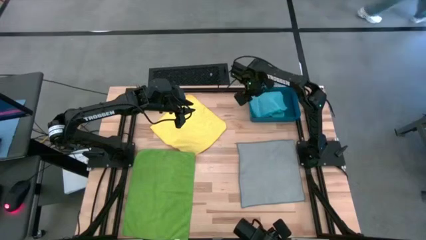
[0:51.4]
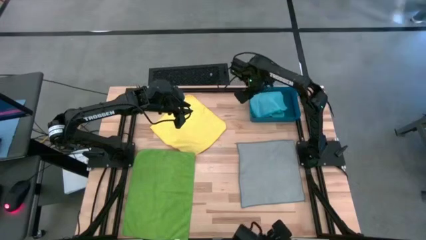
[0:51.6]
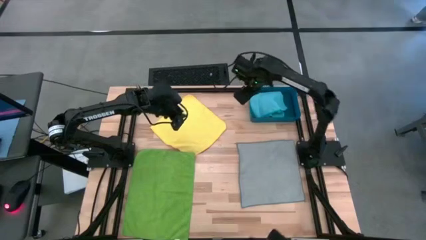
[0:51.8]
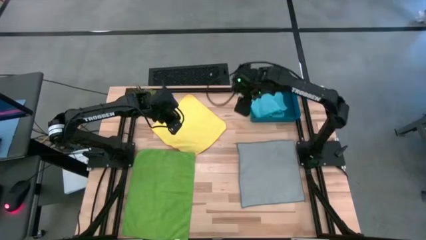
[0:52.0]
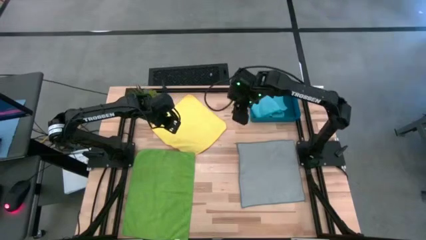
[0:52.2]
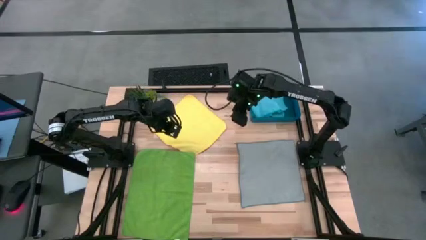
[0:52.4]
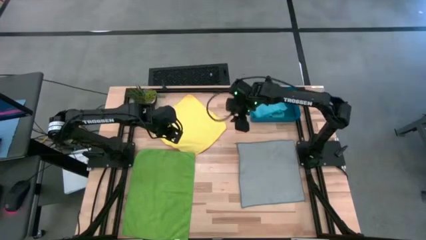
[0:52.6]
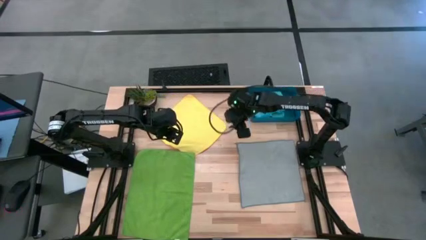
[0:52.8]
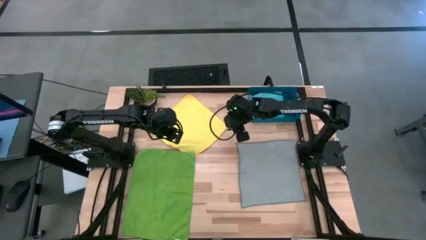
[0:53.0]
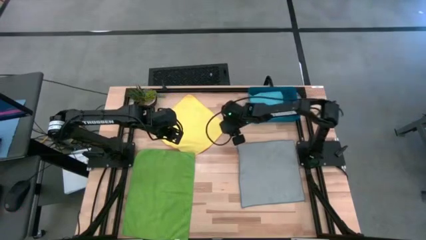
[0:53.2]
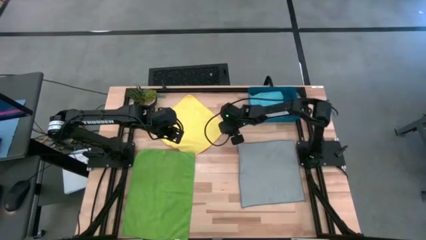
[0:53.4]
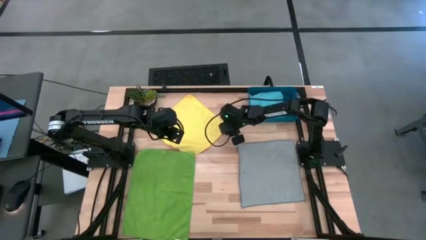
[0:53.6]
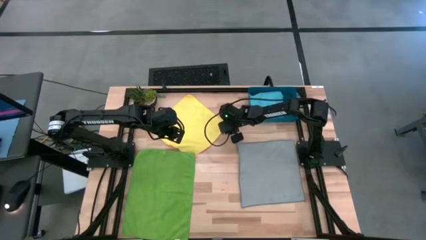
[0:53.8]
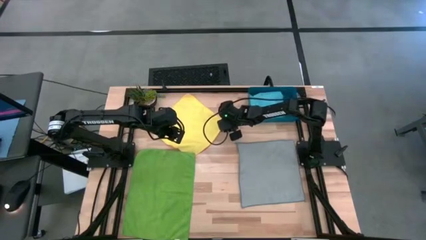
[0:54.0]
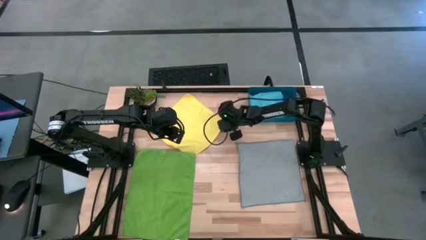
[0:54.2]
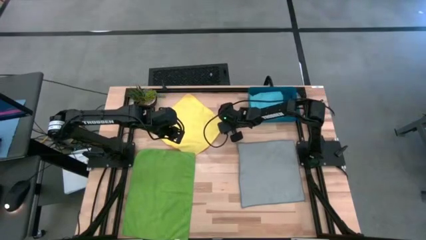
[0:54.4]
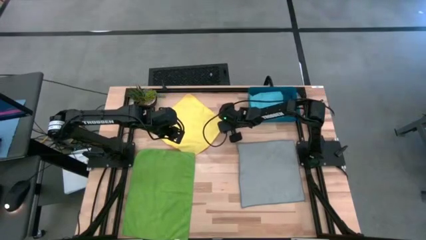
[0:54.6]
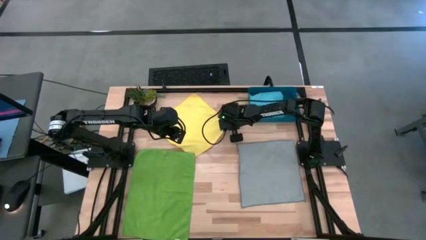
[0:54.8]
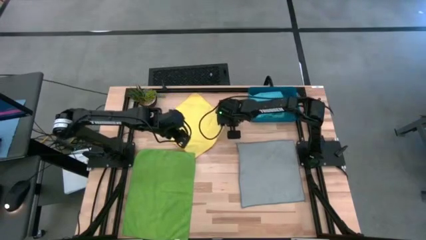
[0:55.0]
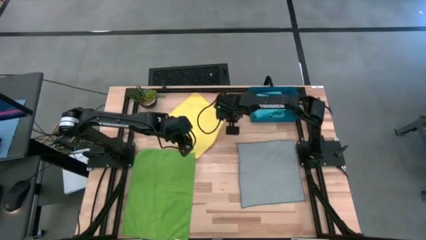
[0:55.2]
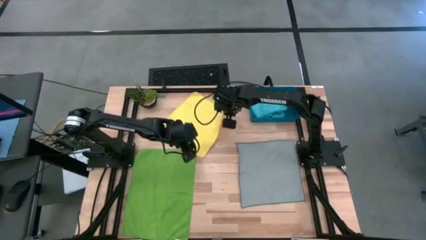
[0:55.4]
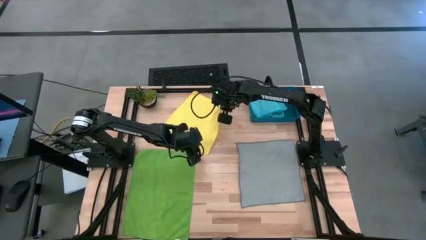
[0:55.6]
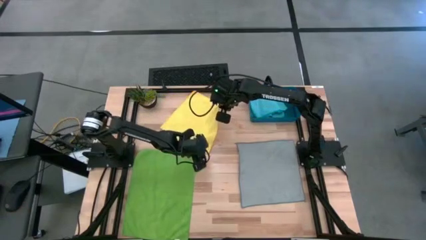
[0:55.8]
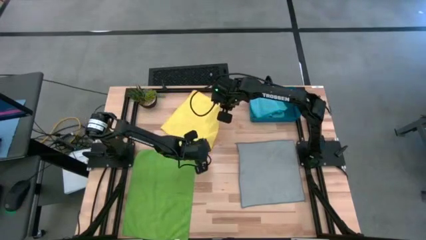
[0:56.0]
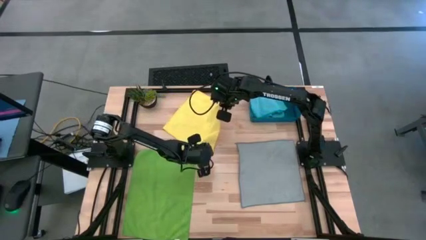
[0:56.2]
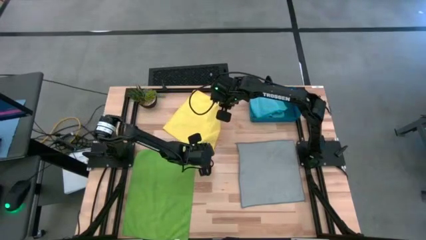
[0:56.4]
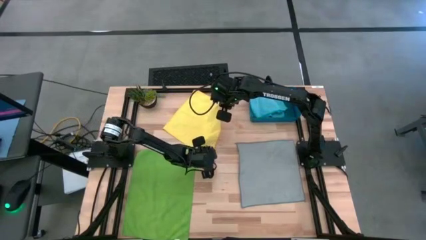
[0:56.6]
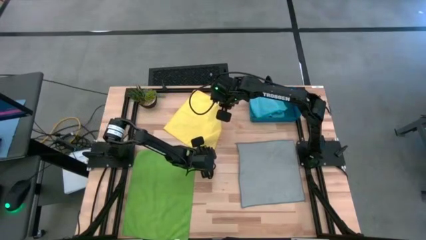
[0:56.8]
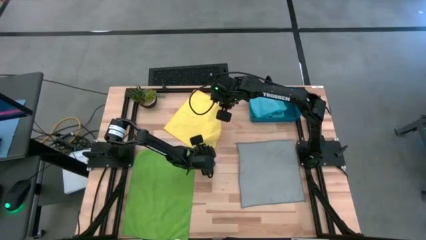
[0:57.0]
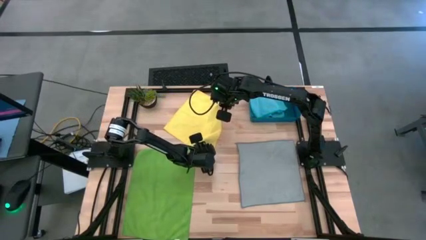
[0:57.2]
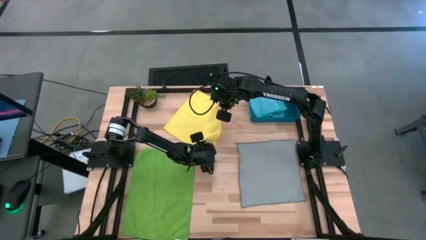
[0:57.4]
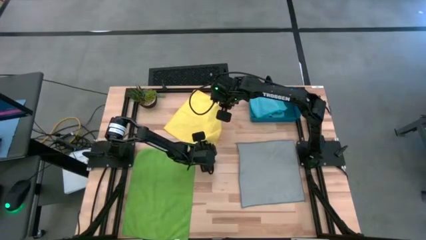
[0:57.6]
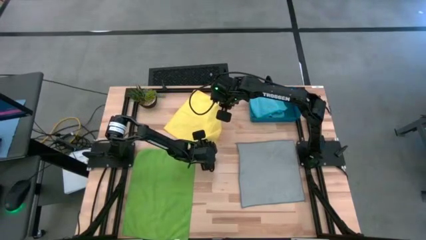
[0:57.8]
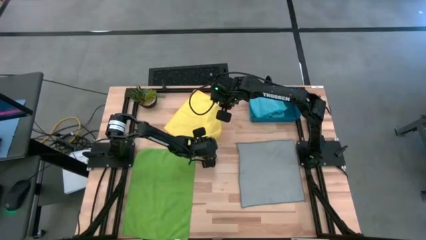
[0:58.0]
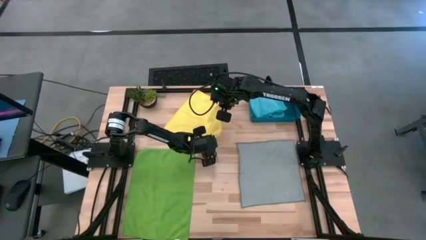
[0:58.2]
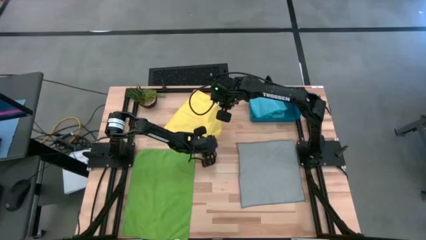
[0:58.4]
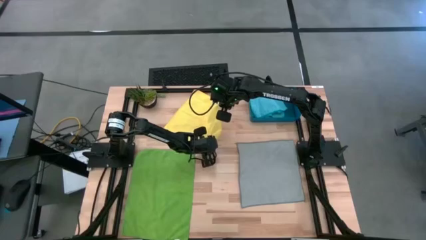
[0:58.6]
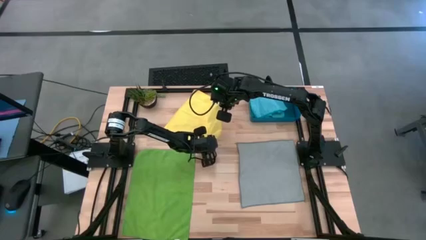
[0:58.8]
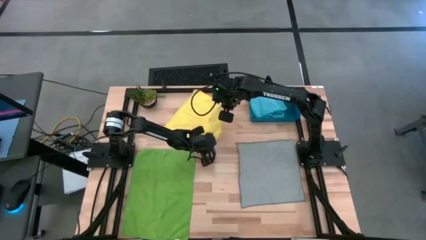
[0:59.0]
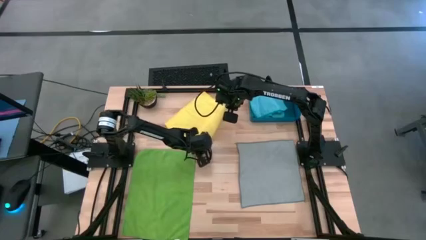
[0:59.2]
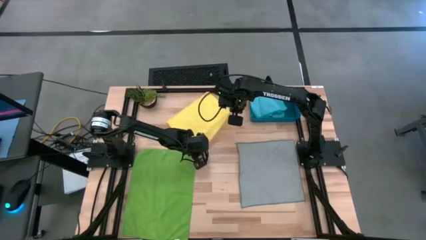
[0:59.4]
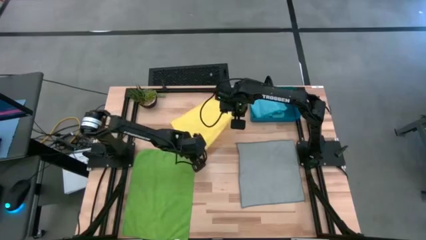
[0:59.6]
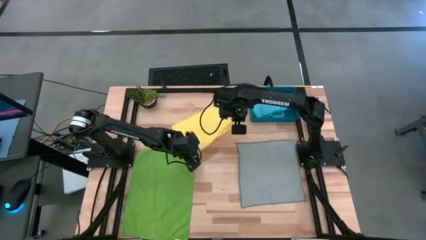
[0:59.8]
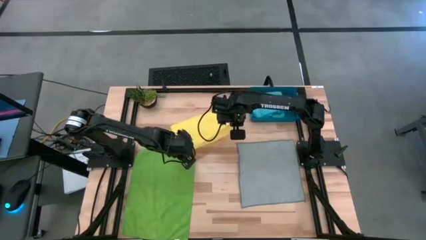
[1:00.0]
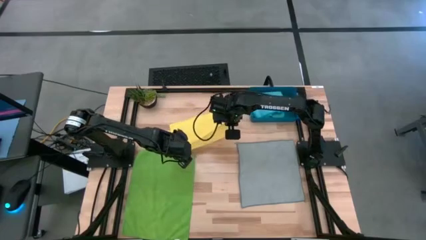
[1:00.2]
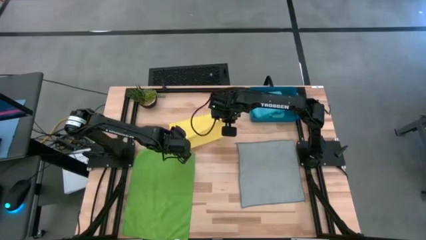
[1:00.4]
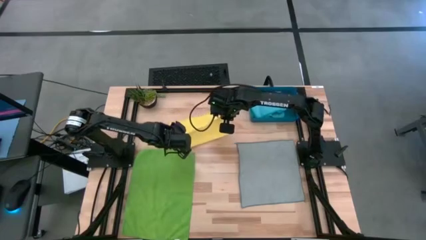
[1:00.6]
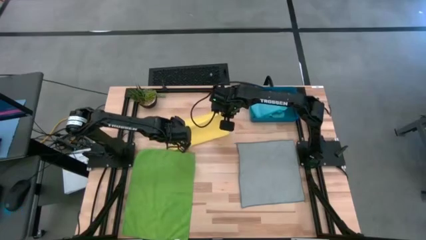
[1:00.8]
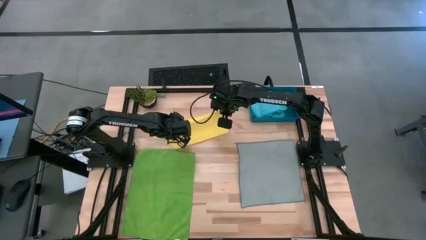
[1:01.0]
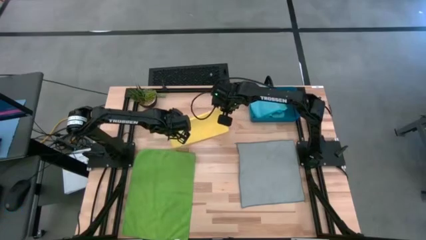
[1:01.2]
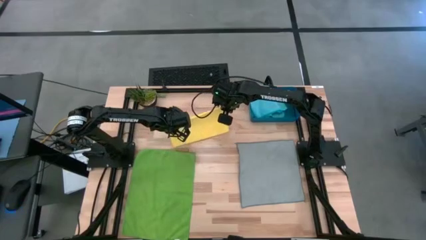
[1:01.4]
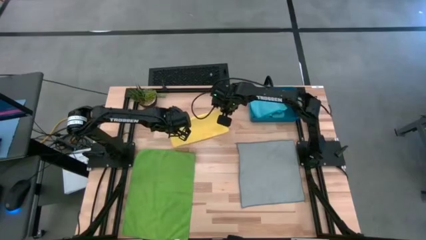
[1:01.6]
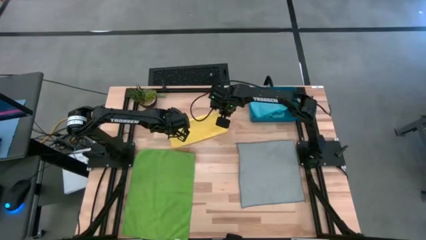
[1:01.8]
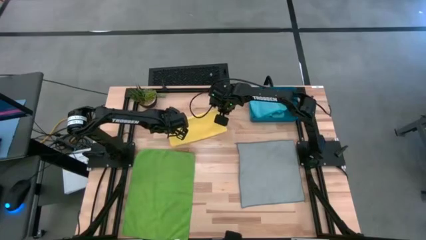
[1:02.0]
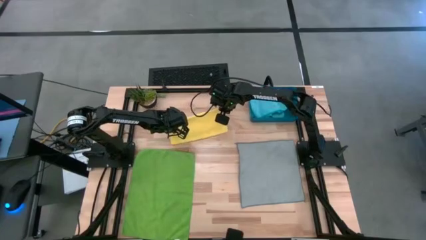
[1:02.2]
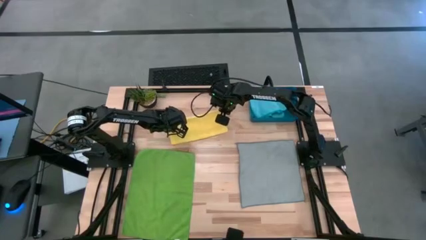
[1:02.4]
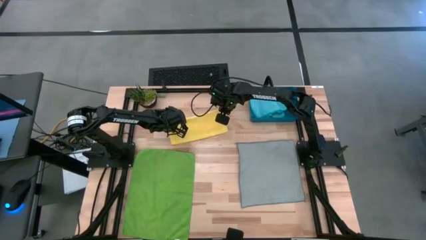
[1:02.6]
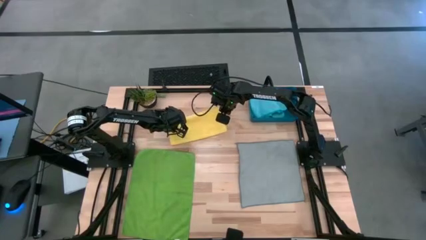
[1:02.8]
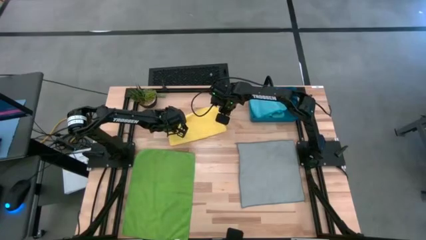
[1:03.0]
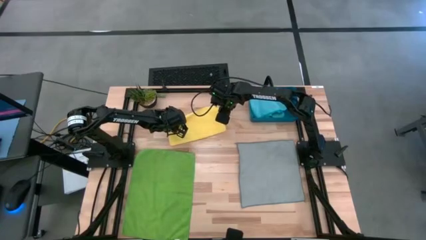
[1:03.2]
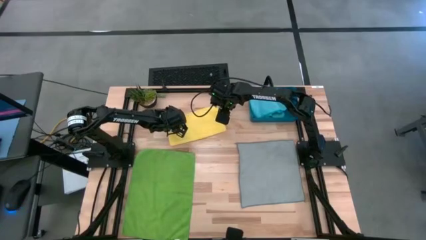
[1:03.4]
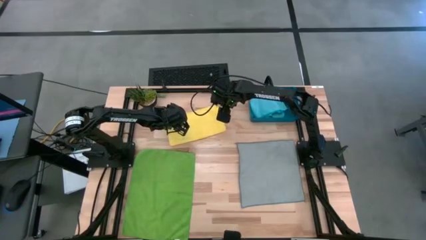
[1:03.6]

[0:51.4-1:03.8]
Task: Fold microfiber towels
Fold the yellow microfiber cloth
